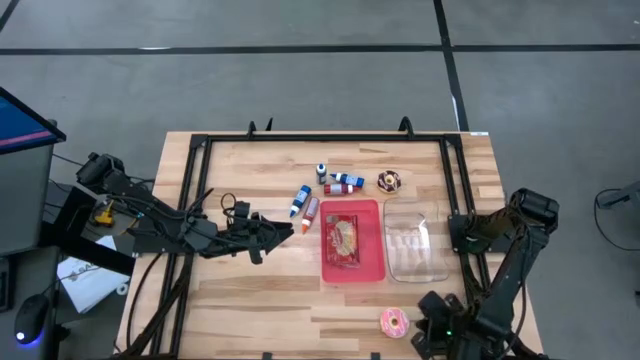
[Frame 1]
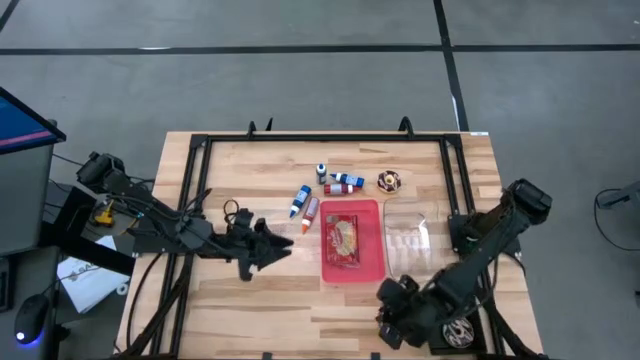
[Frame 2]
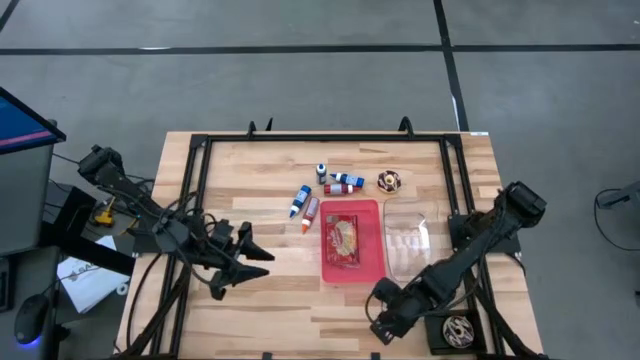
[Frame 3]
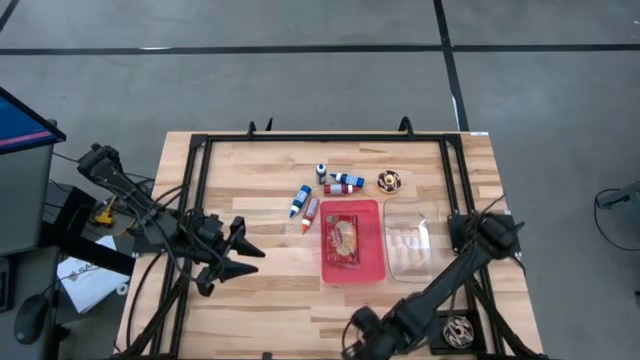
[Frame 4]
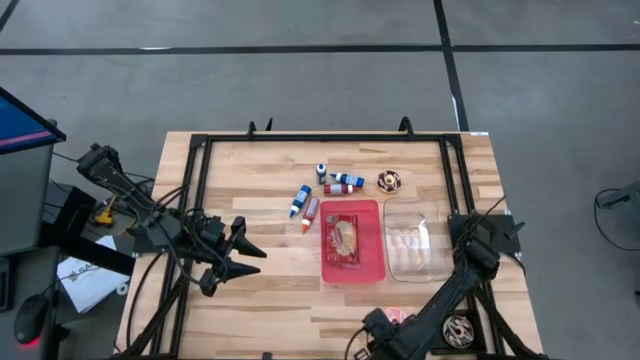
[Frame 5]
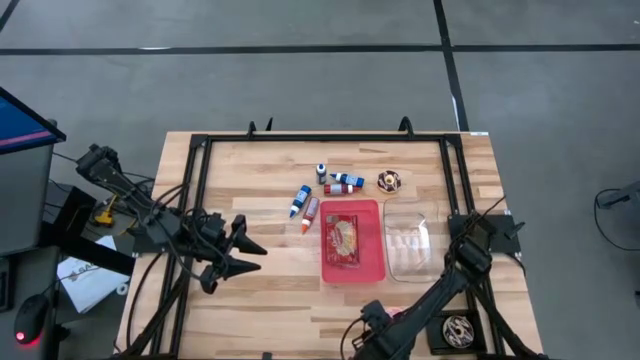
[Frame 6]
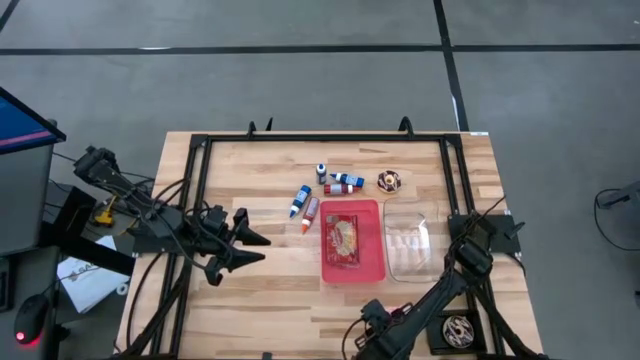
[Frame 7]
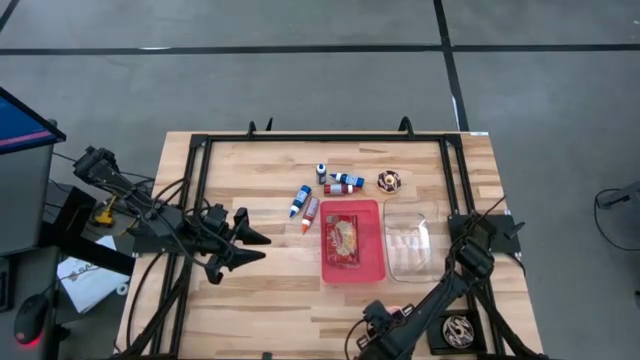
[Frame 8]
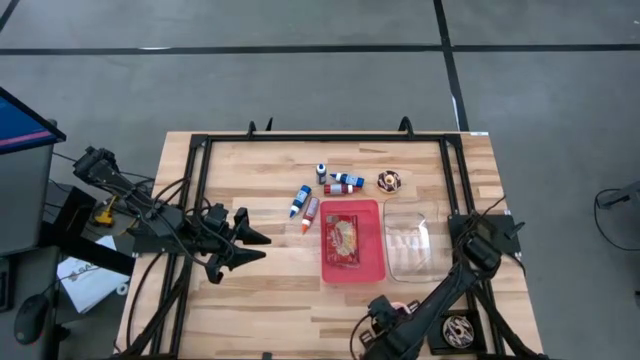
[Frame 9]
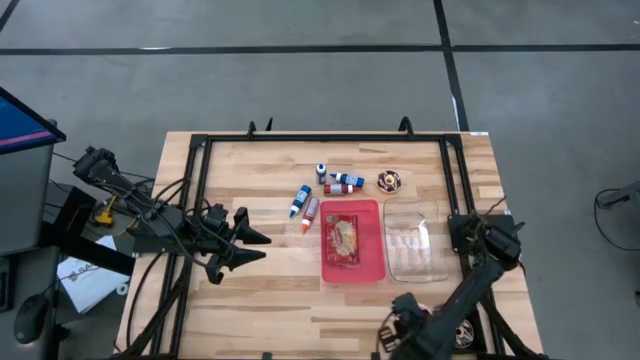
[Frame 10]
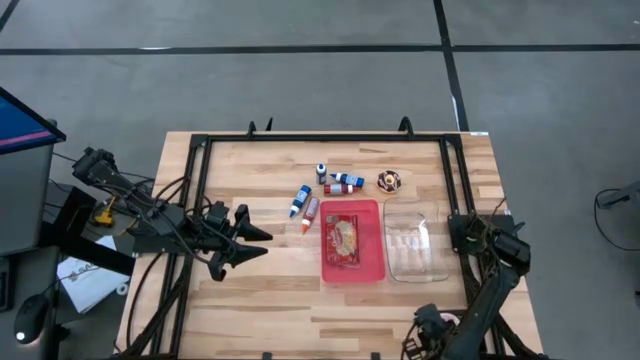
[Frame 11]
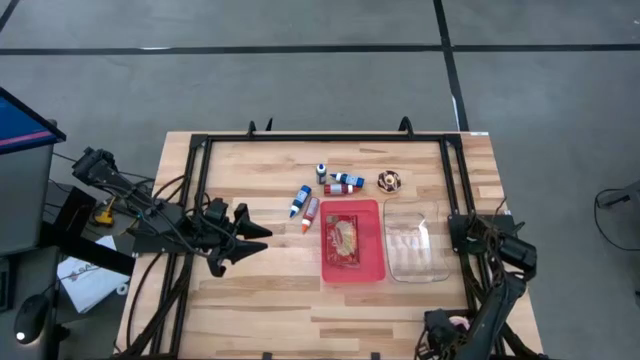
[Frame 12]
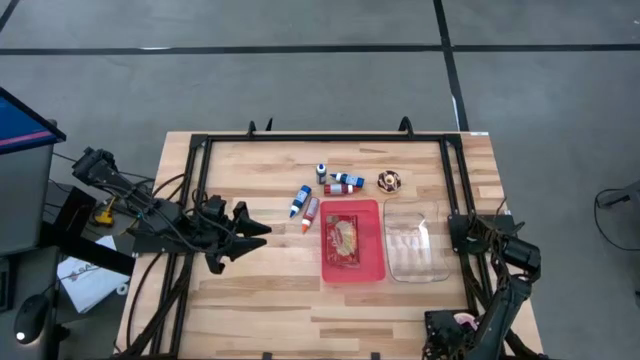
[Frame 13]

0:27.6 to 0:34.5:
Put the pink donut into the black bin

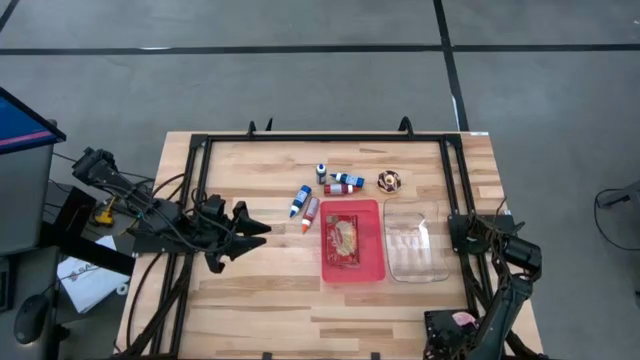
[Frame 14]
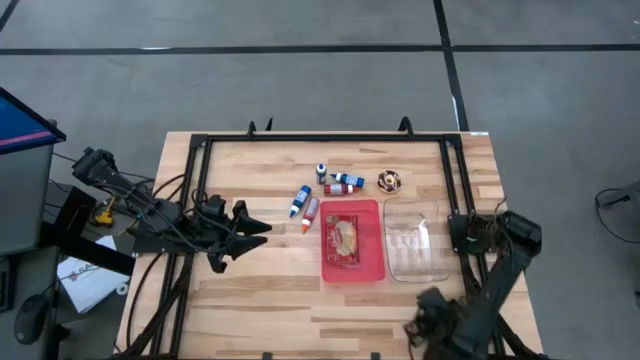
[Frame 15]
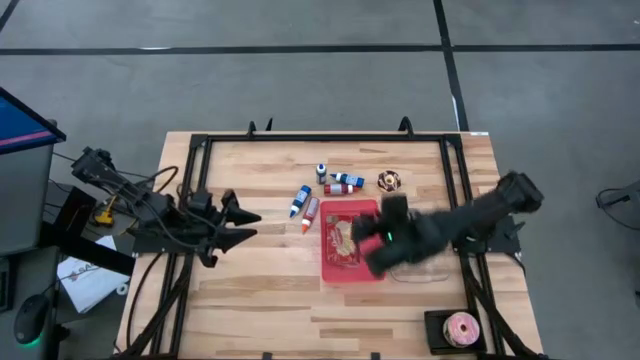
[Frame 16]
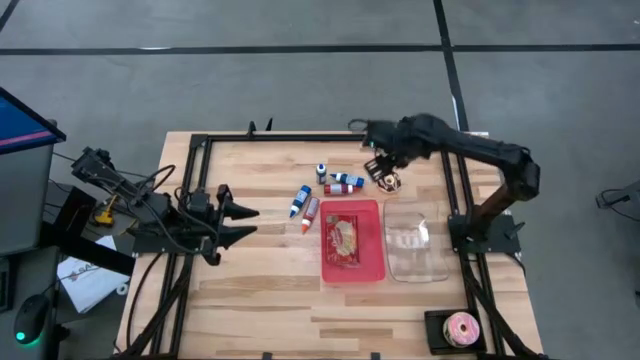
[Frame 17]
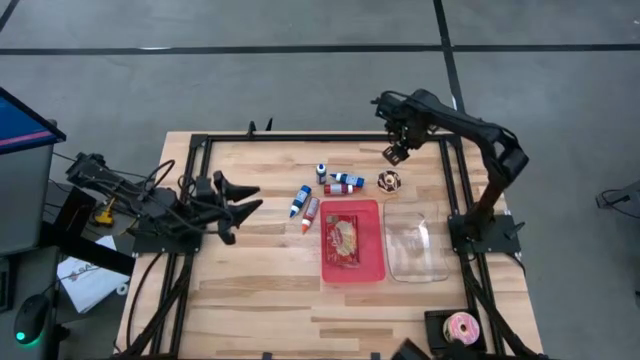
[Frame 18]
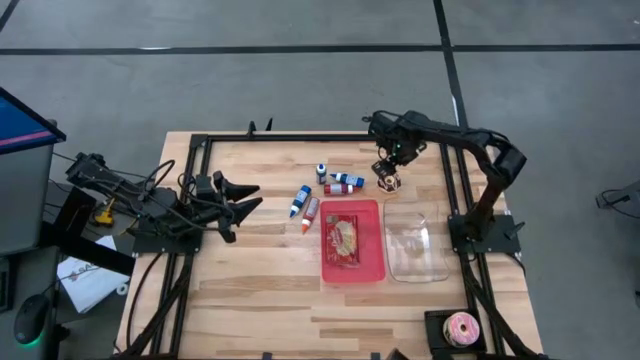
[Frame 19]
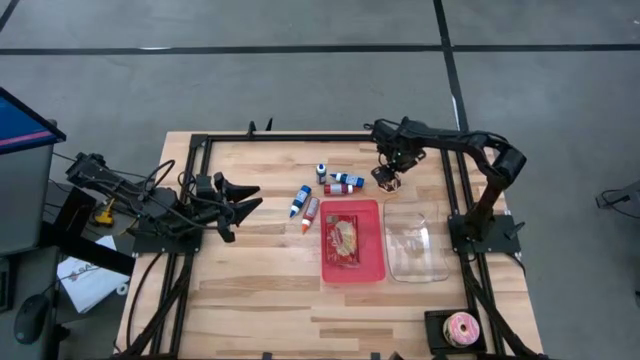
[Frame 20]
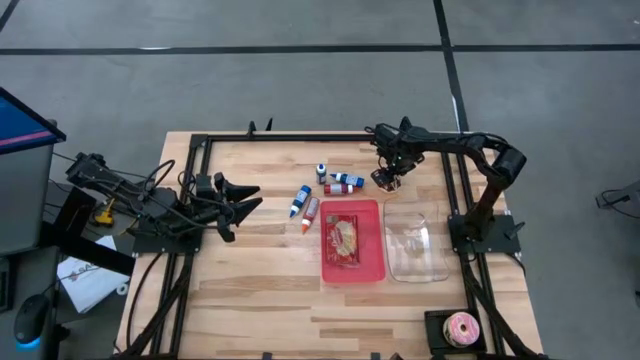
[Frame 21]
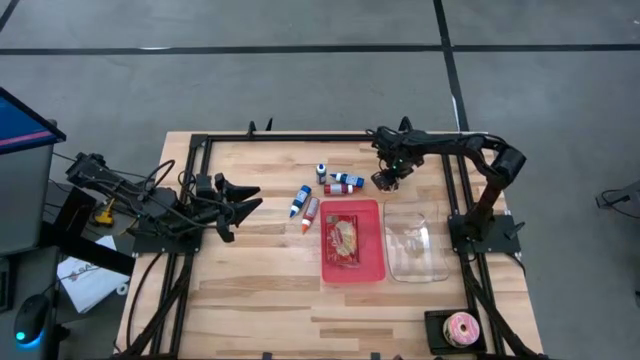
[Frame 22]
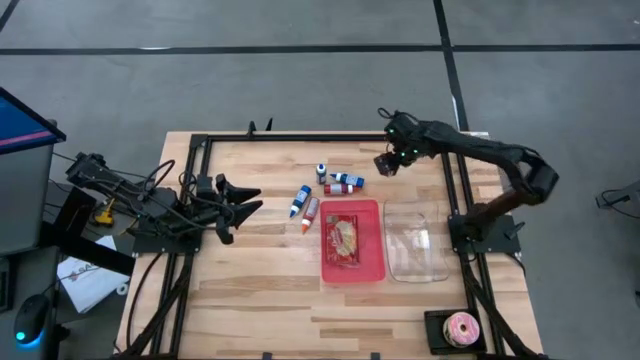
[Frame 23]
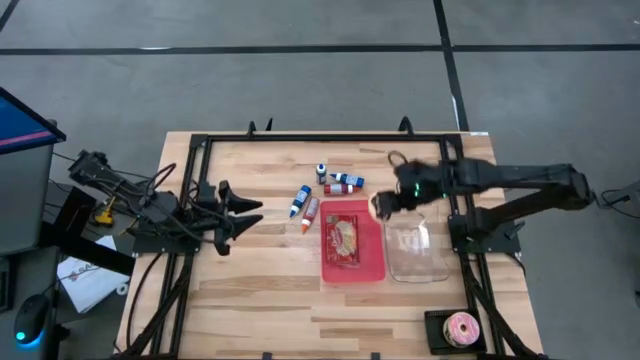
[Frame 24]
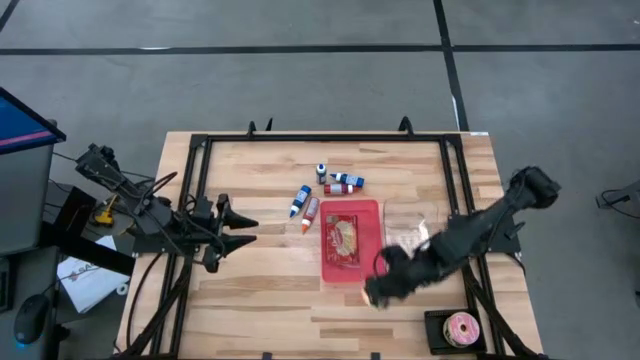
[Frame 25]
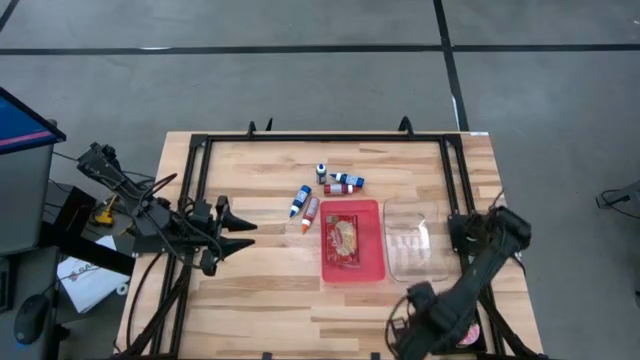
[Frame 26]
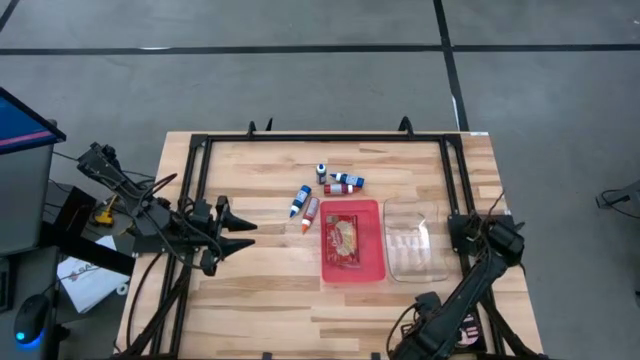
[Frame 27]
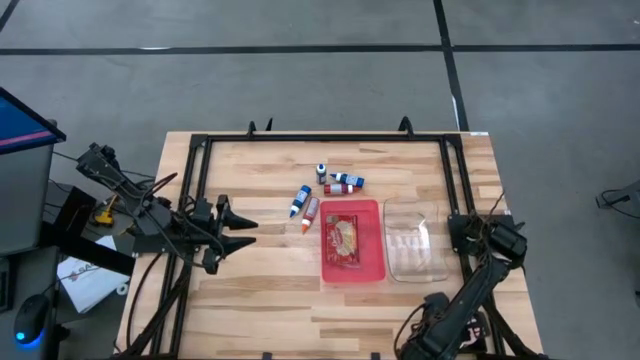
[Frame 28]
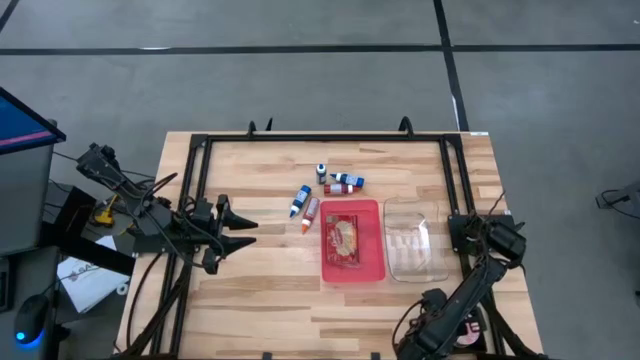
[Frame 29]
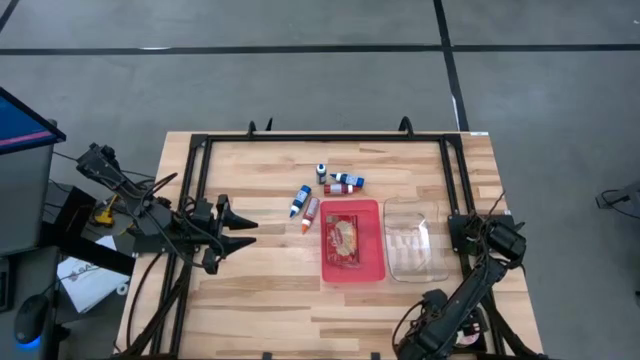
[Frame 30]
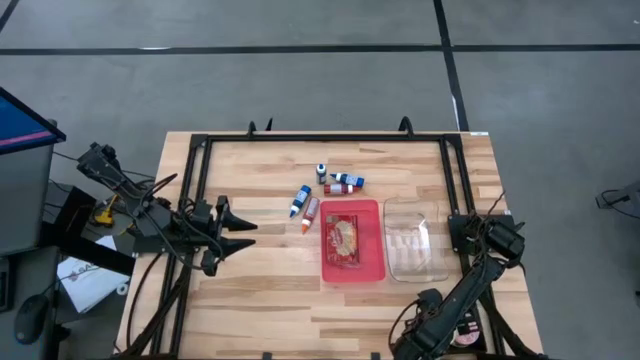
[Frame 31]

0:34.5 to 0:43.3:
Put the black donut into the black bin
